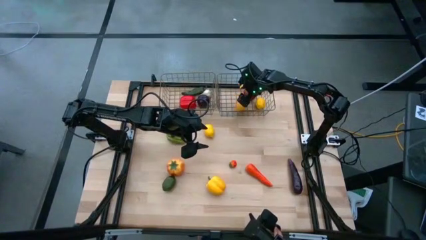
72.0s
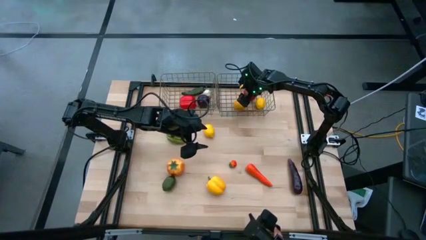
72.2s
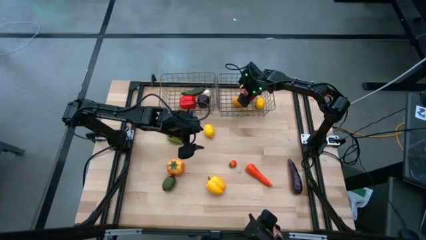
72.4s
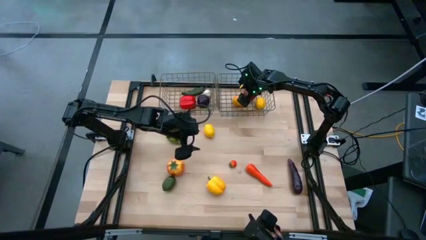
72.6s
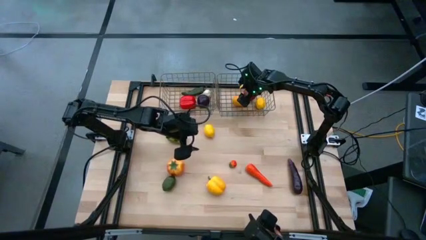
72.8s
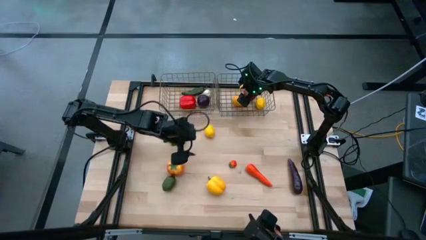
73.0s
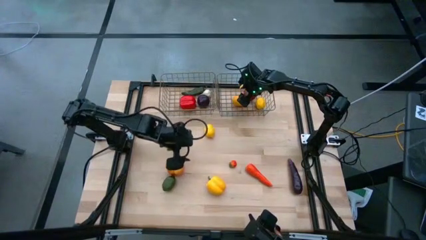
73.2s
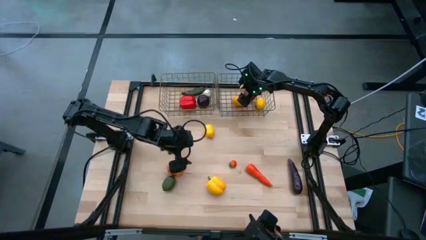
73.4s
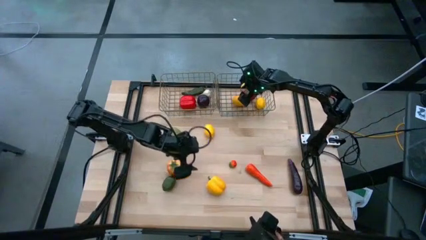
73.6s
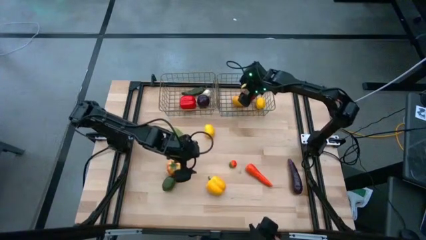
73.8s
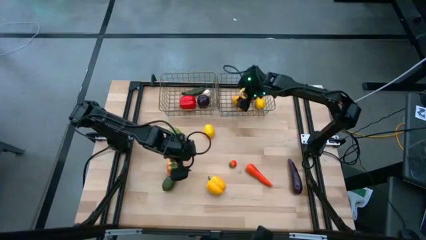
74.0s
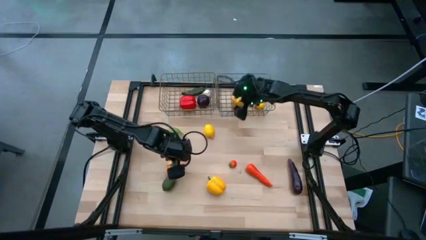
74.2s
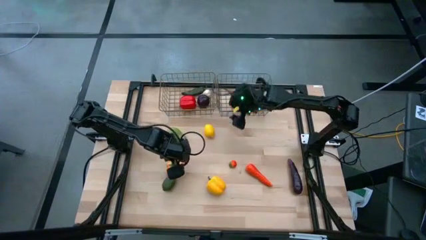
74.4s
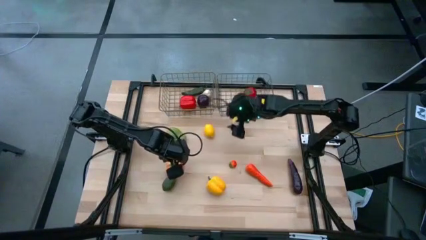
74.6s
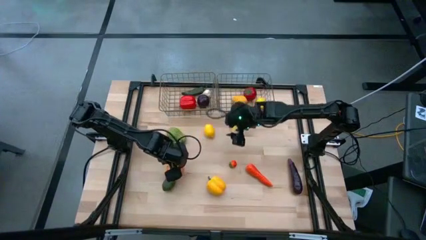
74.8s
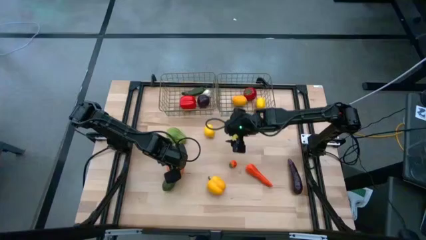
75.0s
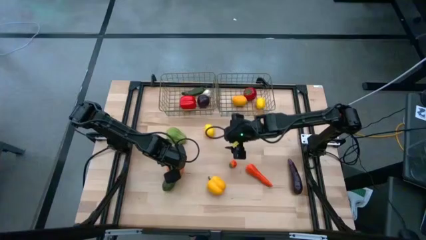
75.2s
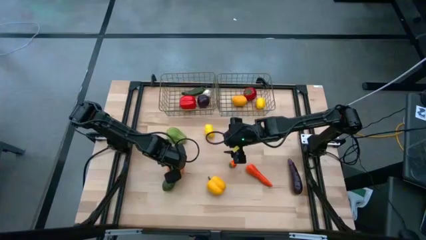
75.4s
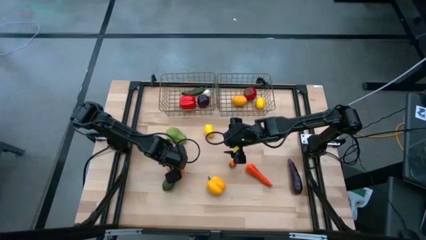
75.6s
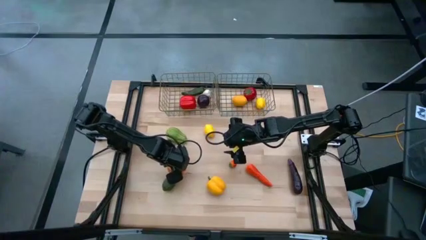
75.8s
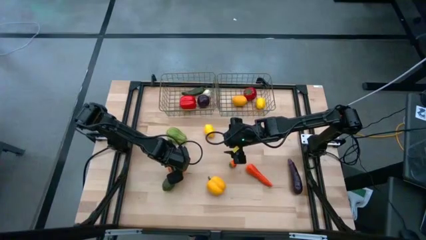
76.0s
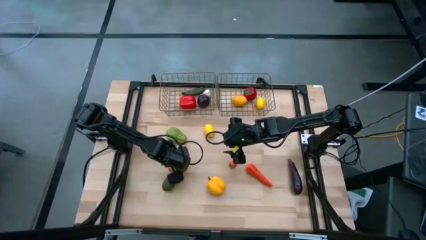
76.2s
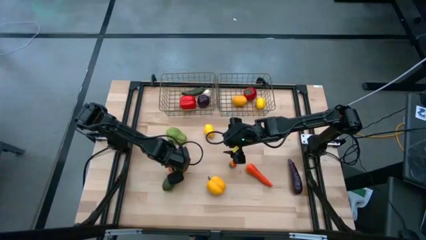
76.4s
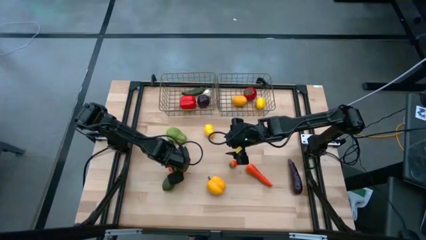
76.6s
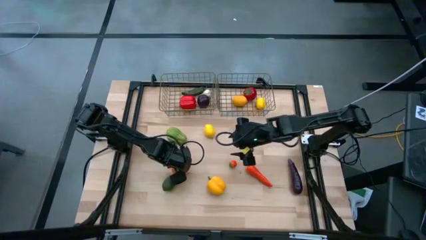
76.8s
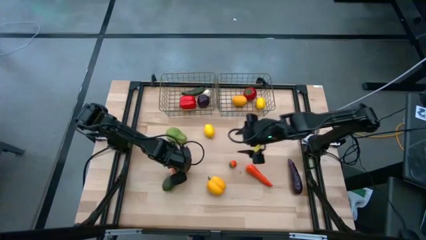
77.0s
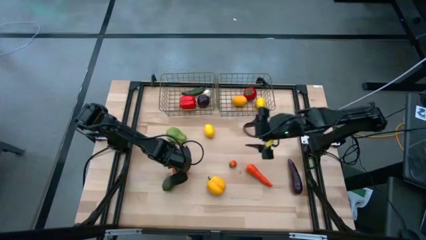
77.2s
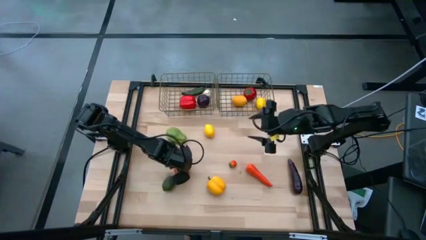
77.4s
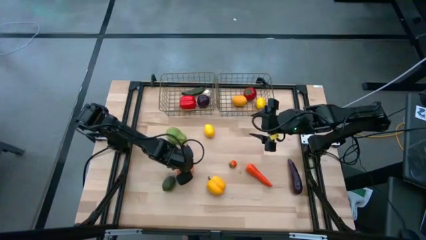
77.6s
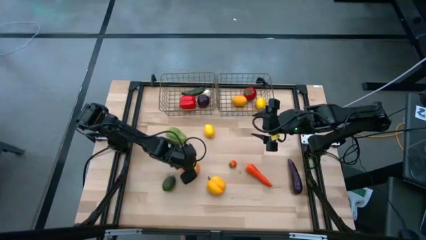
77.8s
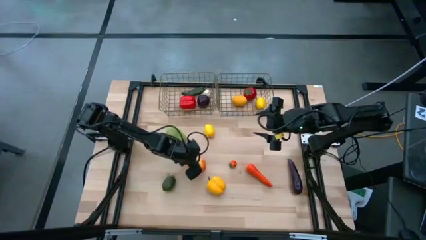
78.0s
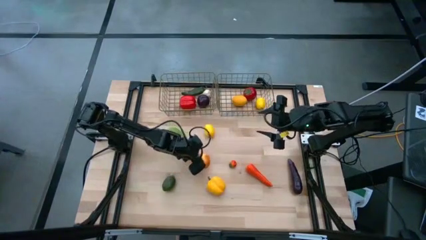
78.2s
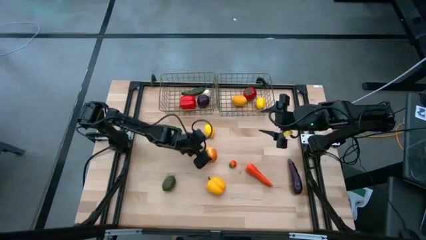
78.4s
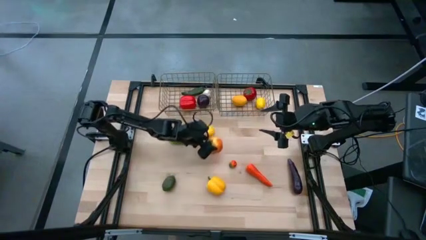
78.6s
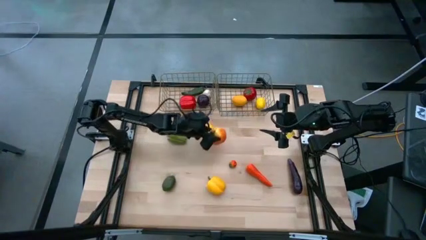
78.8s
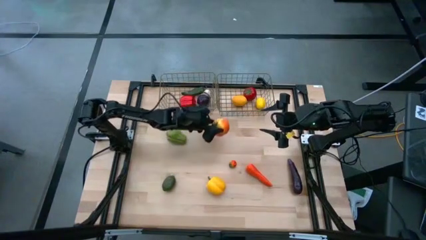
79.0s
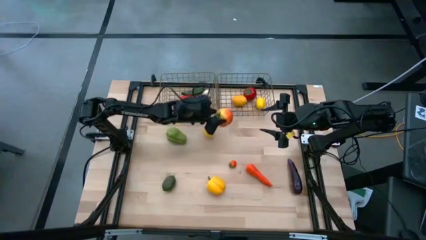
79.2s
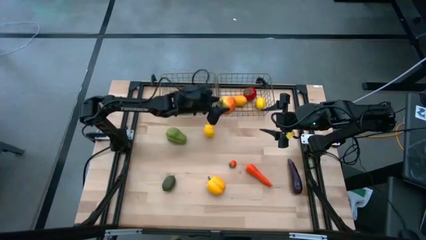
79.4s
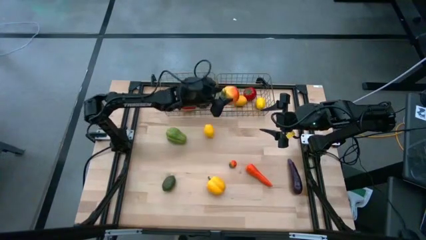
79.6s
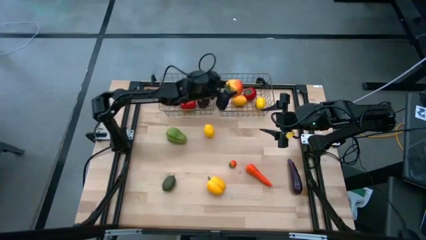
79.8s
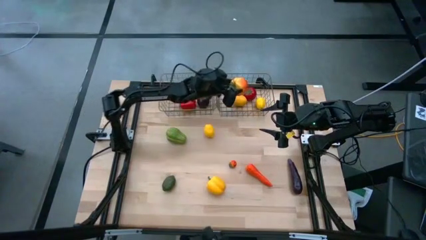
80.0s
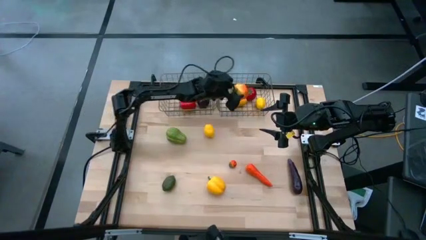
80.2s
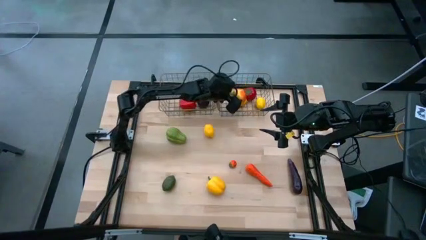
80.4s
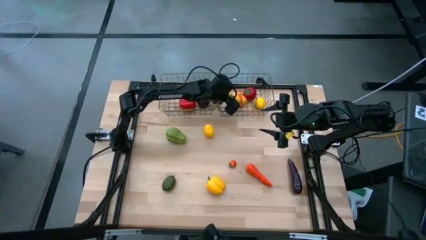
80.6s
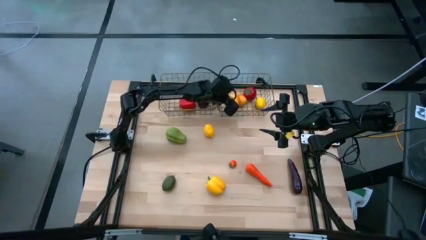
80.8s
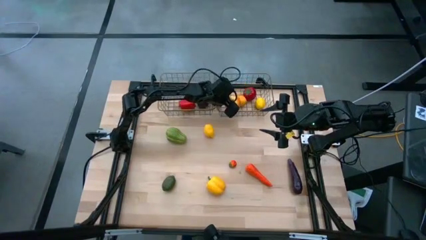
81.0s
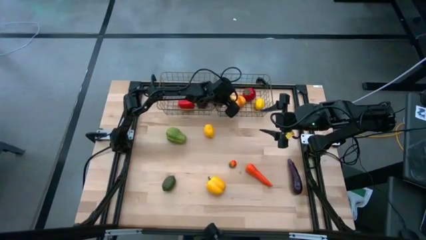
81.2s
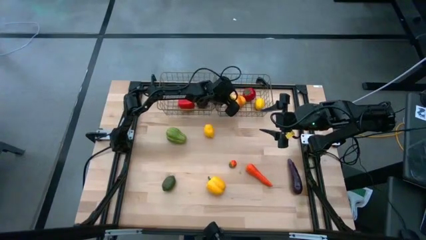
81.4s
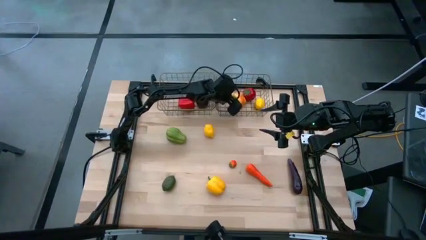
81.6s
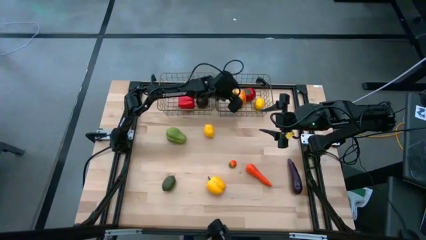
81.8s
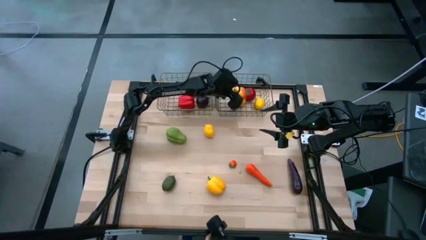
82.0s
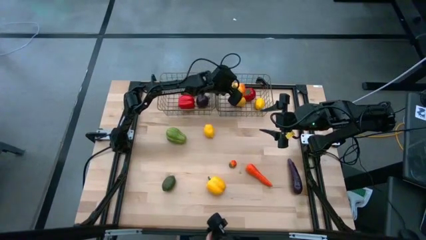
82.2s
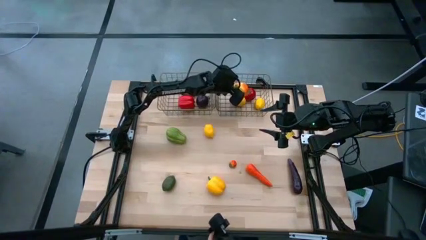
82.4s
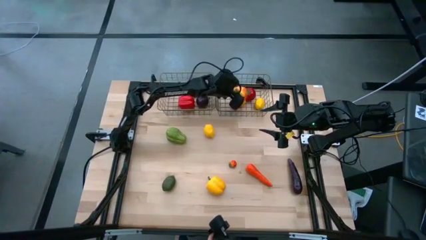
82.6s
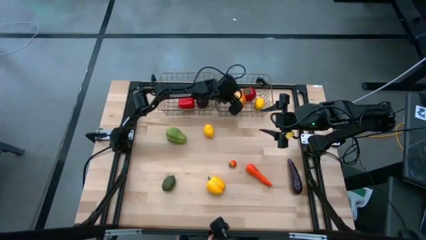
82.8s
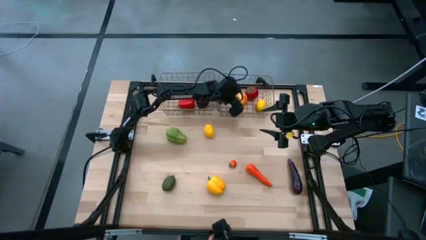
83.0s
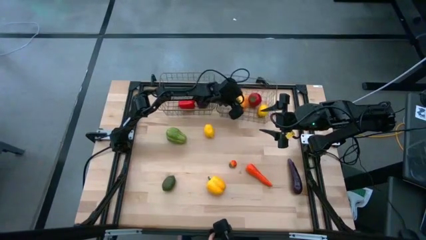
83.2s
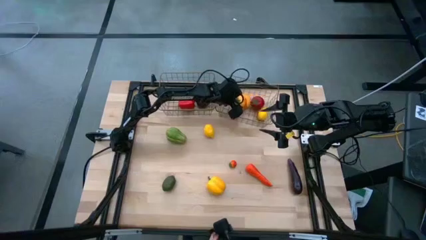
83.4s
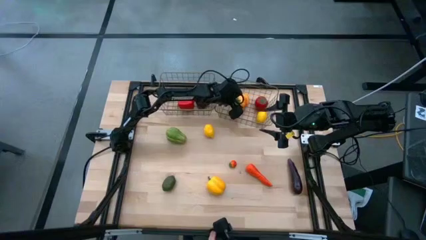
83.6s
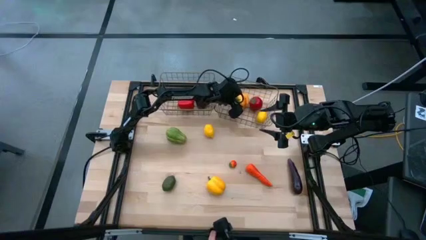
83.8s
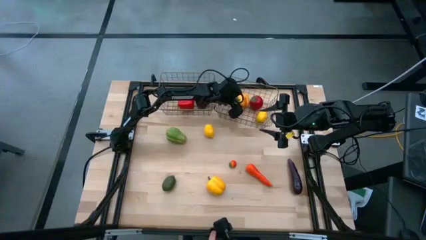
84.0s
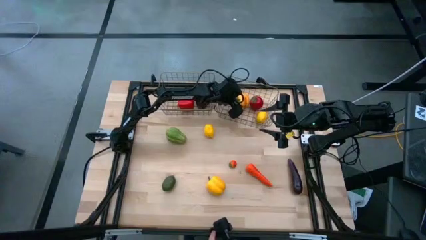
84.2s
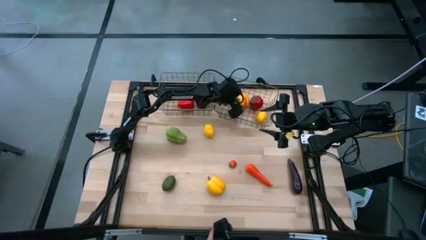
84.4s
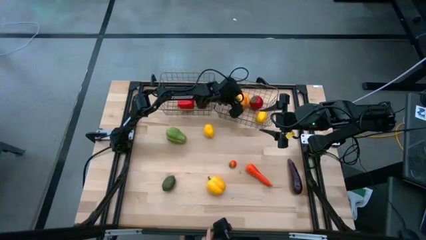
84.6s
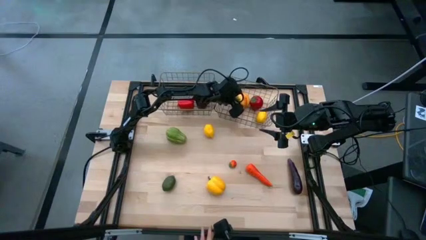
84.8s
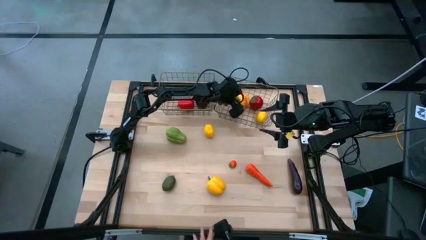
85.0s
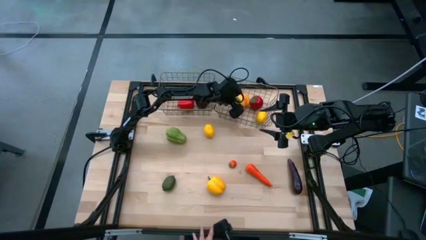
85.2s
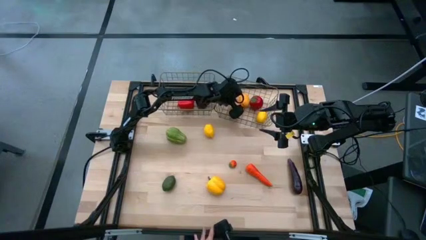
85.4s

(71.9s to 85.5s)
Task: Sort produce into baskets
Put the orange tomato into the right golden wire basket
